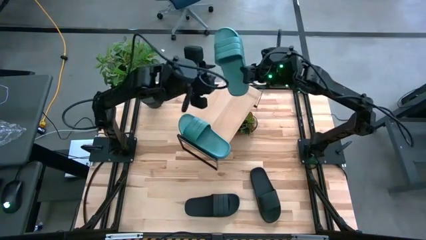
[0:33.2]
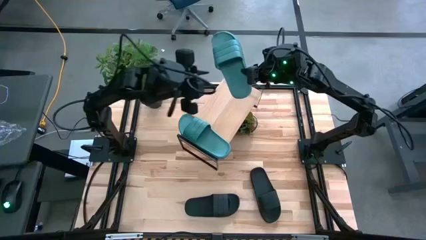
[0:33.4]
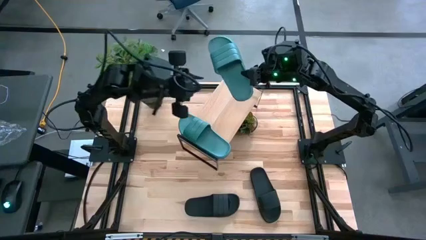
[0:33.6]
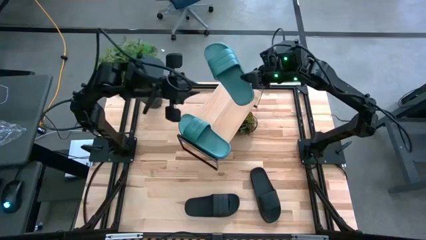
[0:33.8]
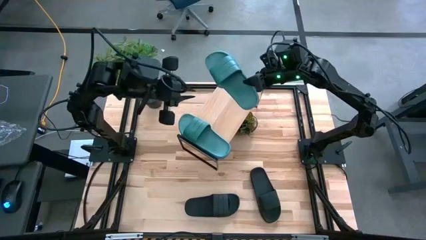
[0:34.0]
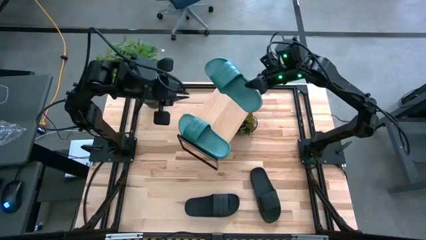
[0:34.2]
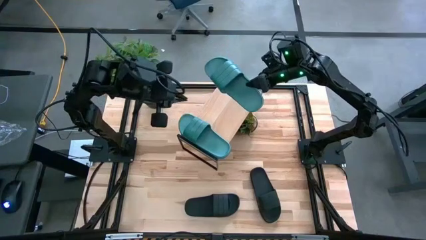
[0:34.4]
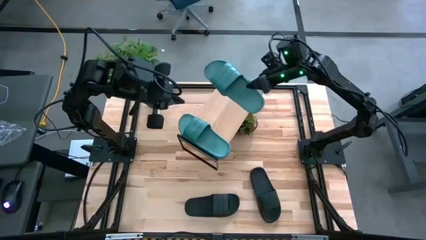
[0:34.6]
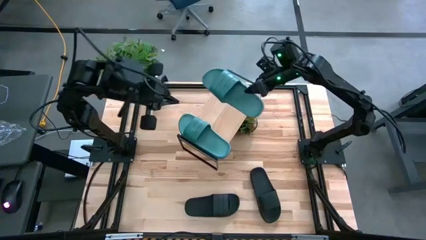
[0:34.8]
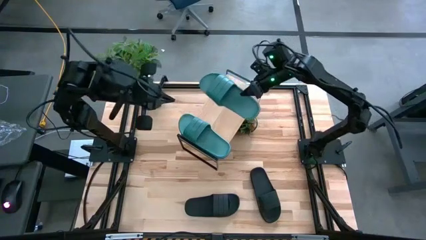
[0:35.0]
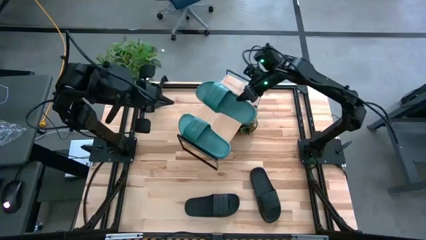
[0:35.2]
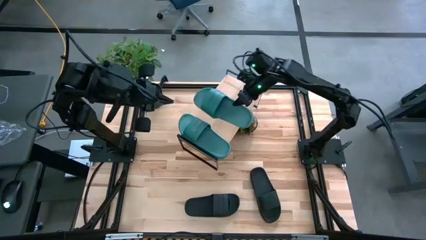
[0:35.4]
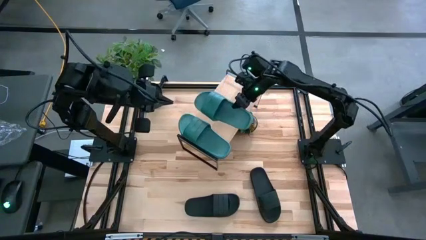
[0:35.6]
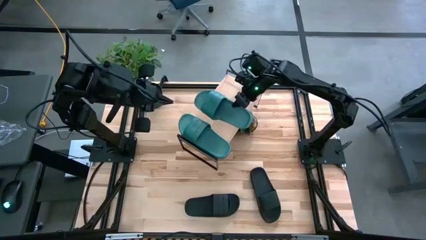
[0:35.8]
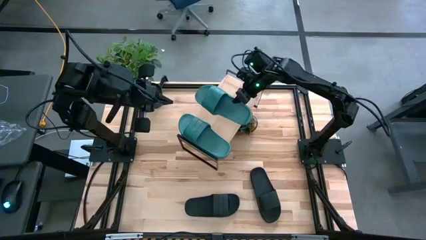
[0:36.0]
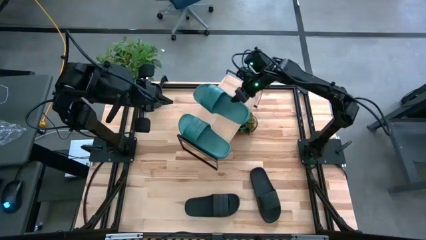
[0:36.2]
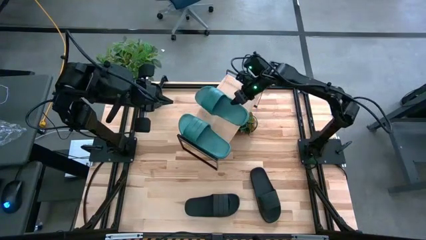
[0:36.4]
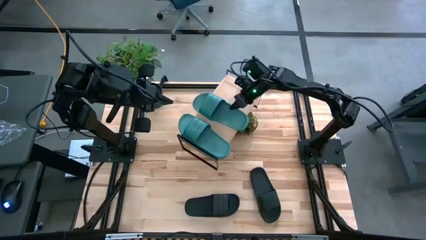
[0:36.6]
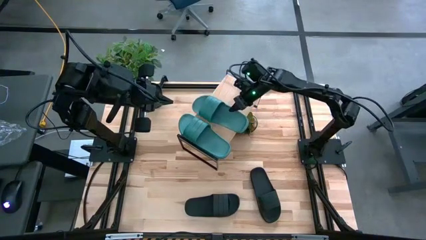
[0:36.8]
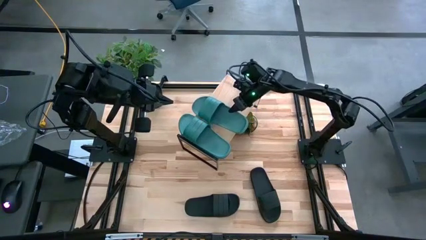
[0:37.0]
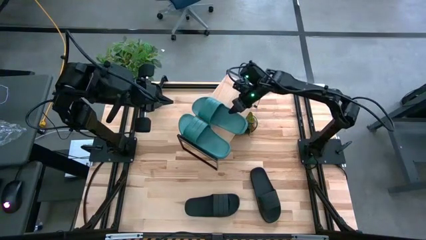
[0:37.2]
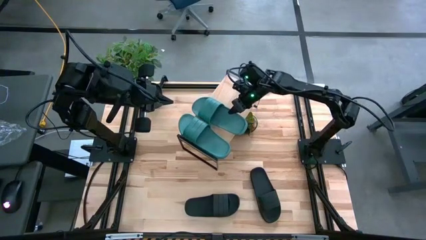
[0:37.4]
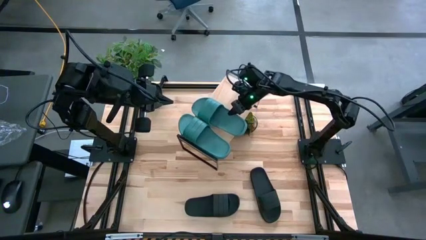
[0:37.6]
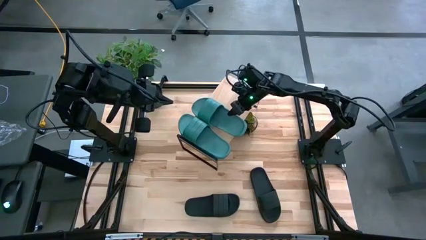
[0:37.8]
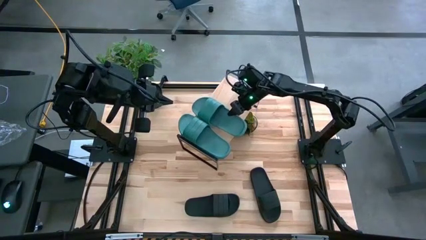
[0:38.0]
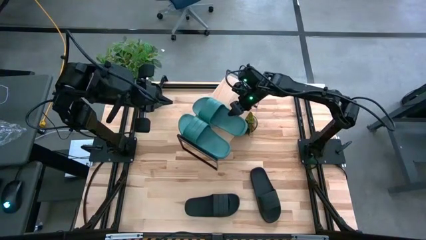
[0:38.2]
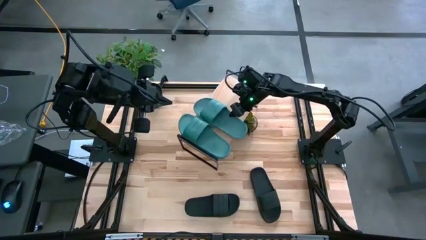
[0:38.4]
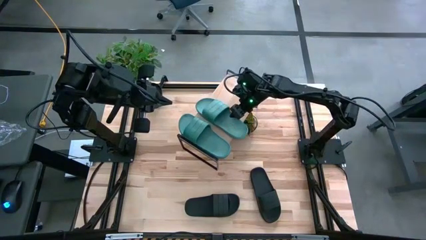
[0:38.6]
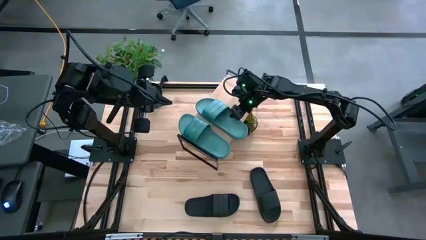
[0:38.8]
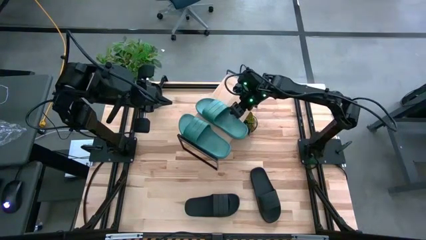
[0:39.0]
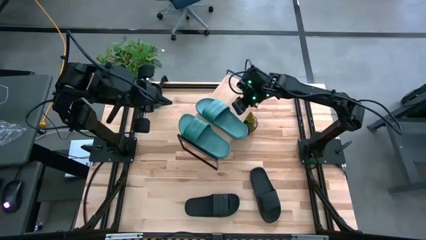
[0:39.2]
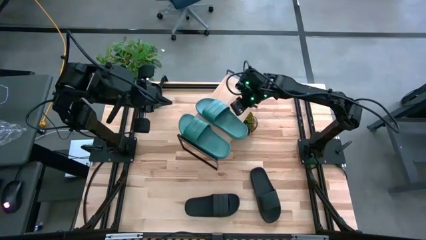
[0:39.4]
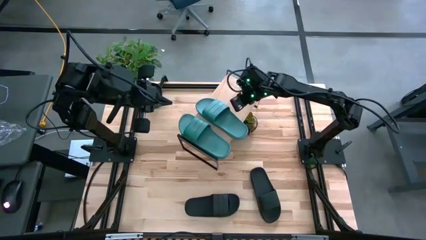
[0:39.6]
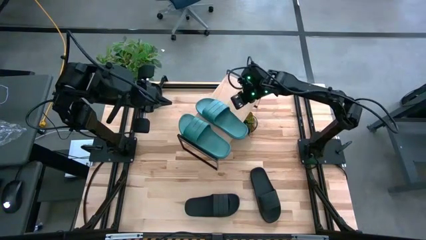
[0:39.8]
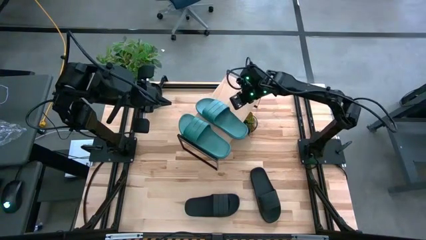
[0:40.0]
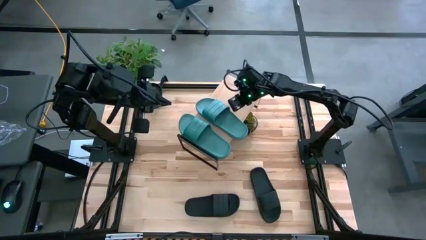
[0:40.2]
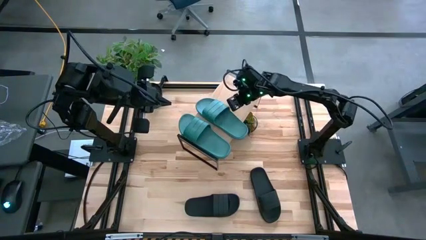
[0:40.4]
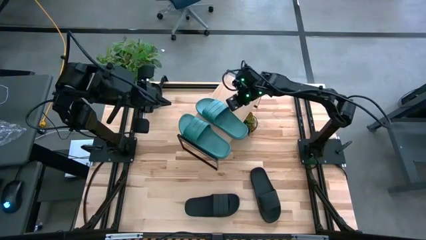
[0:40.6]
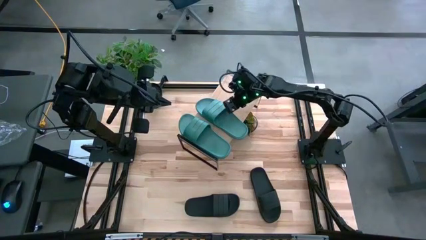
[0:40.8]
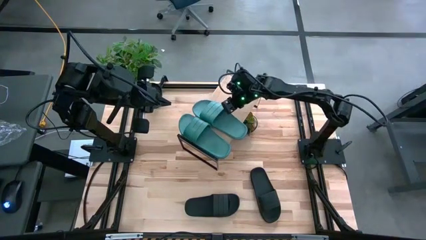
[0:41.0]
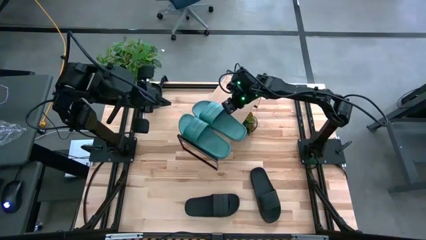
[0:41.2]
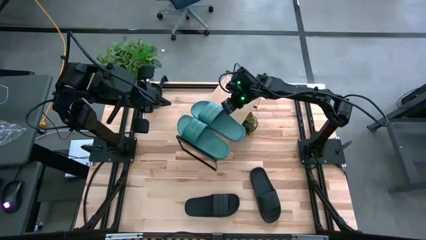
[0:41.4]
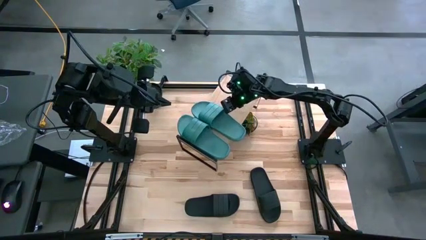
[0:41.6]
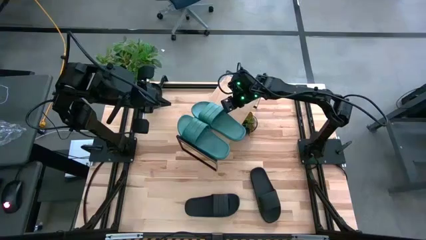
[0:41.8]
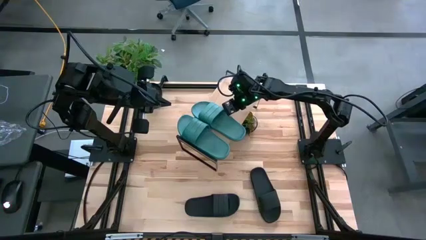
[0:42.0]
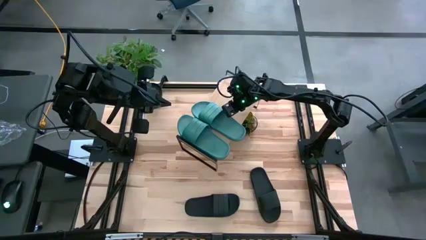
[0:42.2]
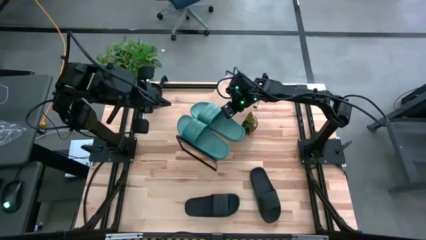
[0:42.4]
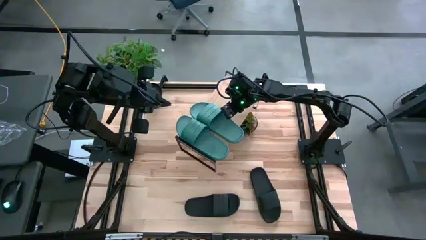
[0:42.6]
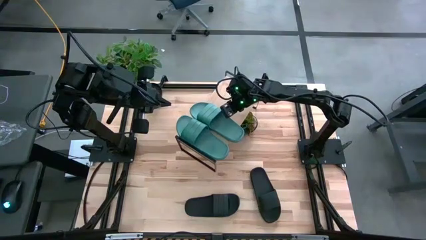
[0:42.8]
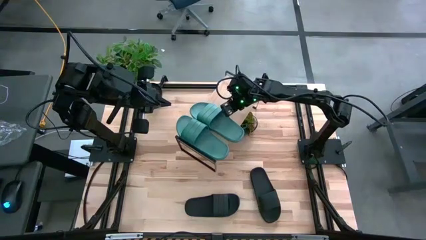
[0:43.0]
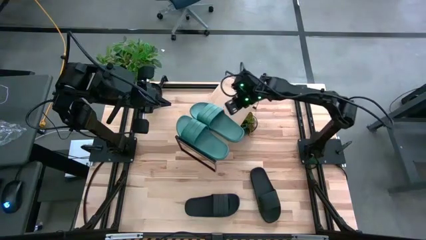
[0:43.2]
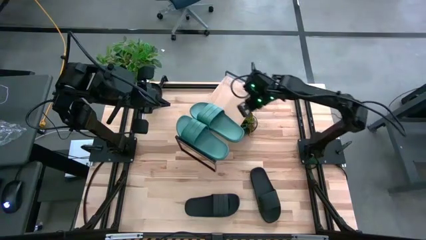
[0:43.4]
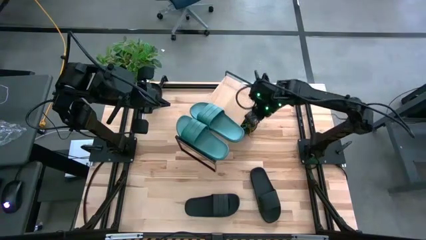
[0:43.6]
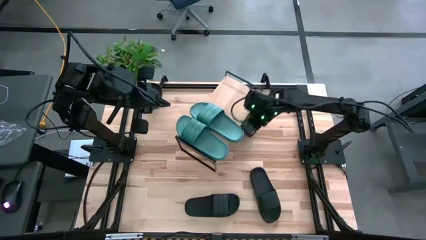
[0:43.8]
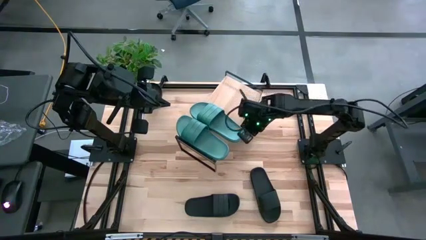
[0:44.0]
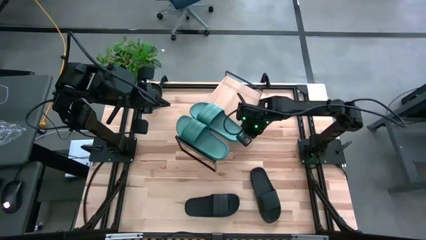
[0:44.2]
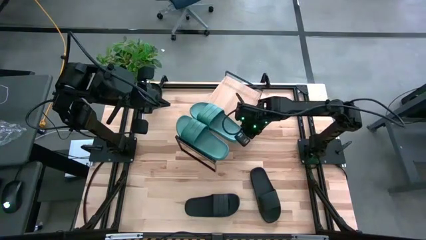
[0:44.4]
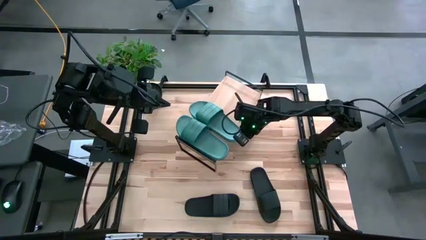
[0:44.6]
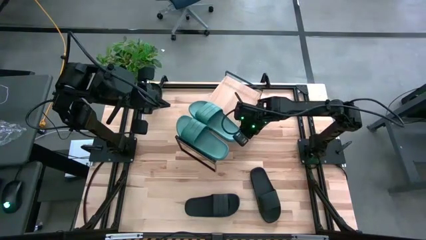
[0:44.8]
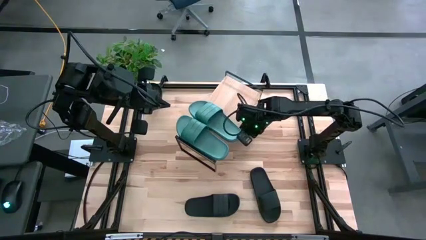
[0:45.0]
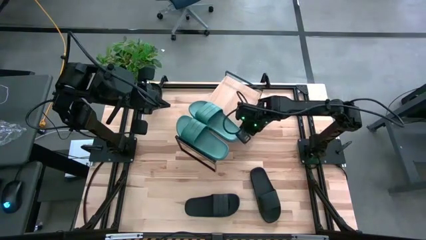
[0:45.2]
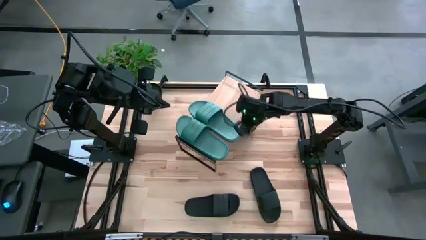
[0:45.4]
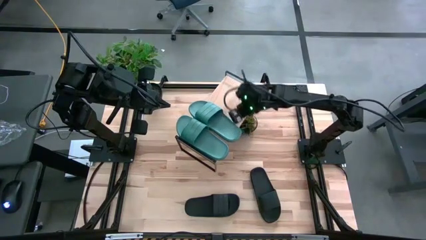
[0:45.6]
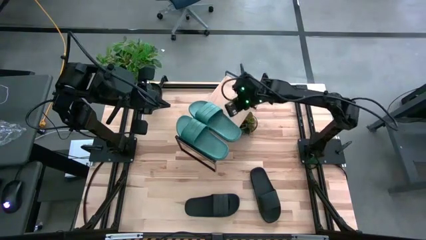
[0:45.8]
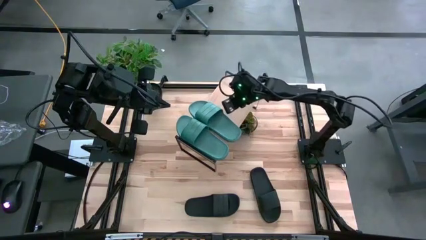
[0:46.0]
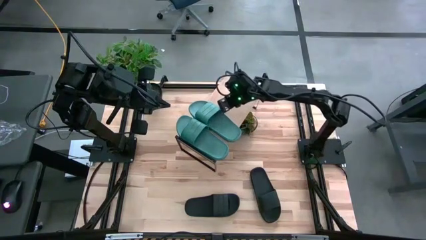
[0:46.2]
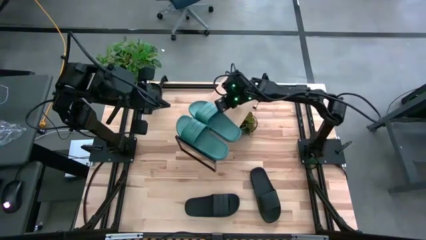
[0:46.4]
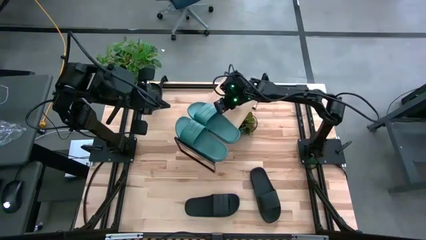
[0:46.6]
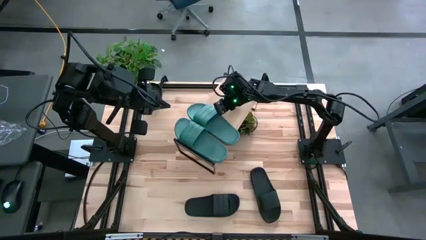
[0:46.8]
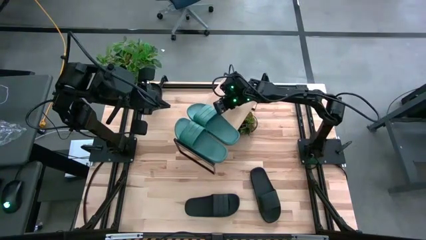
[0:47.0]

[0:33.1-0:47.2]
Task: Pick and place slides into the shelf
Put the blue slide on the shelf
